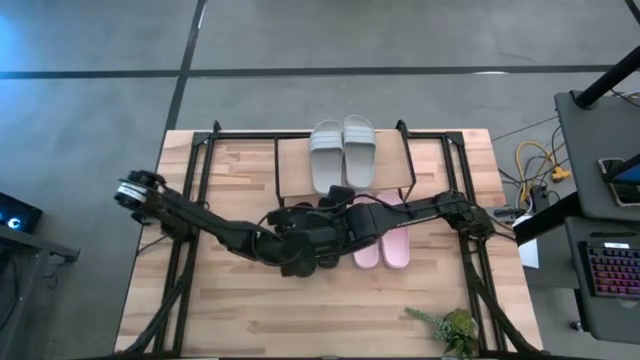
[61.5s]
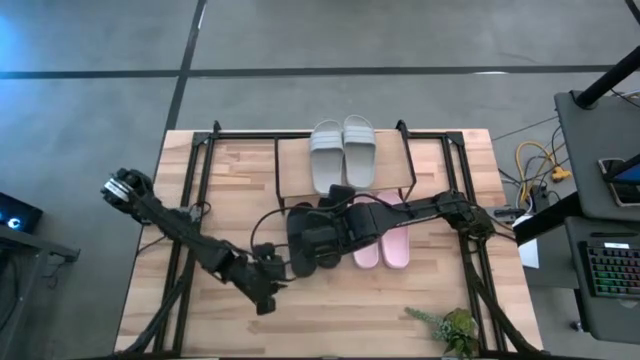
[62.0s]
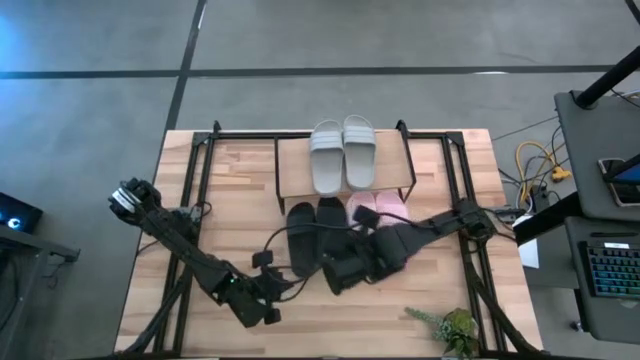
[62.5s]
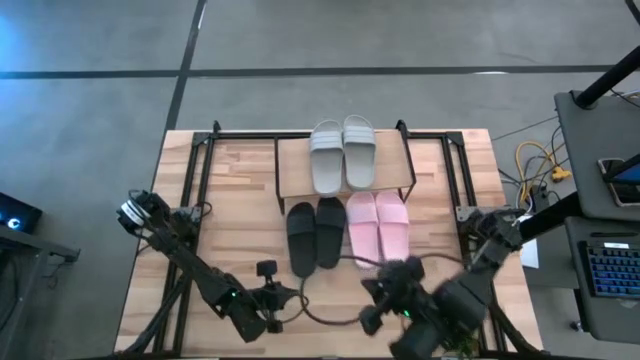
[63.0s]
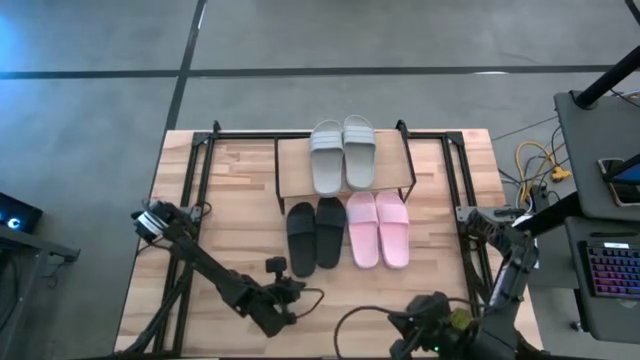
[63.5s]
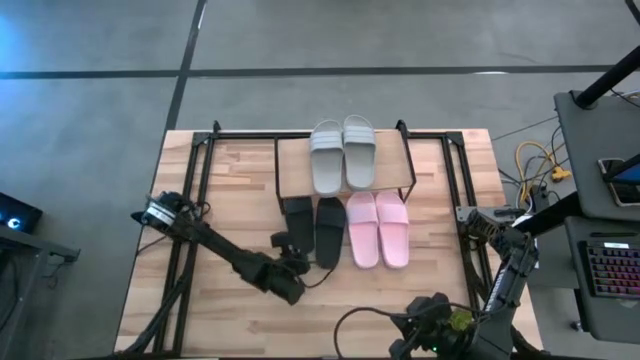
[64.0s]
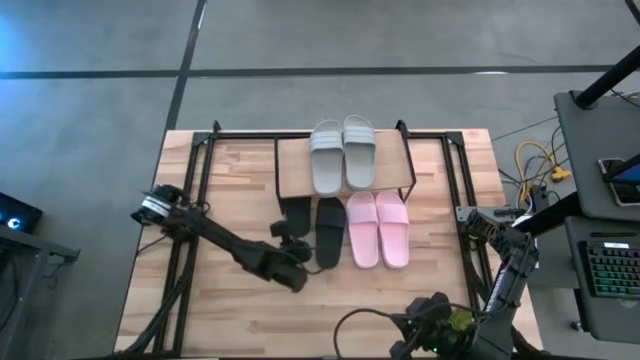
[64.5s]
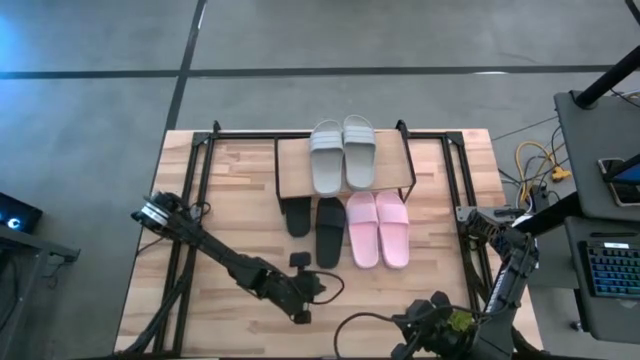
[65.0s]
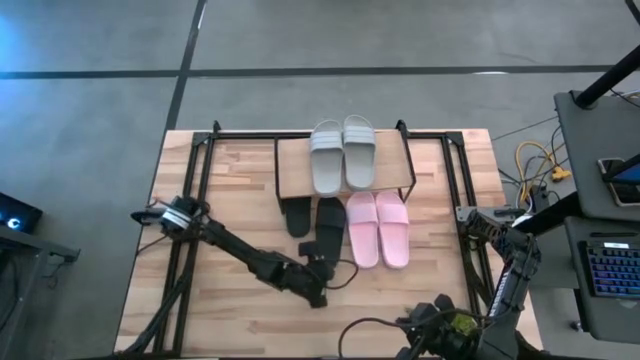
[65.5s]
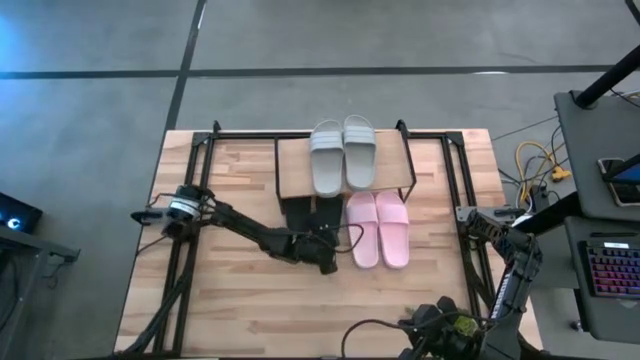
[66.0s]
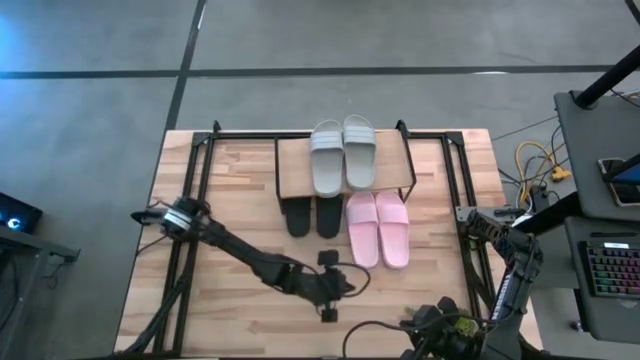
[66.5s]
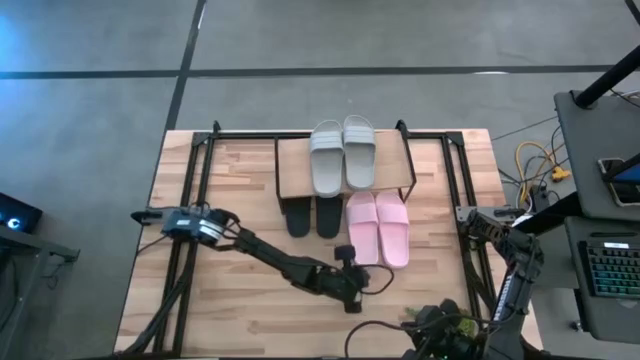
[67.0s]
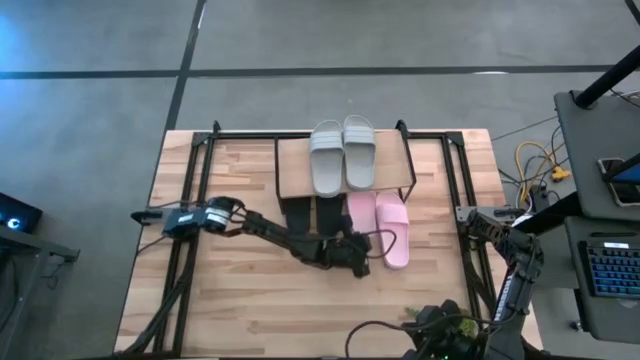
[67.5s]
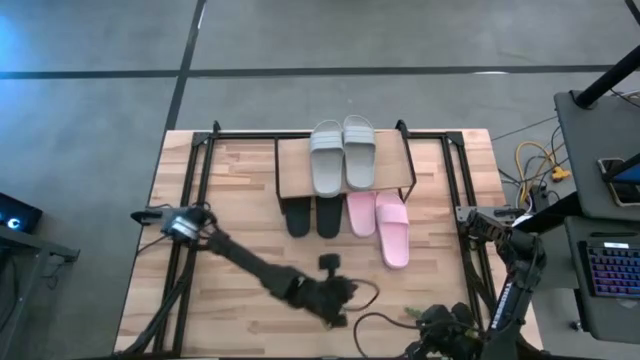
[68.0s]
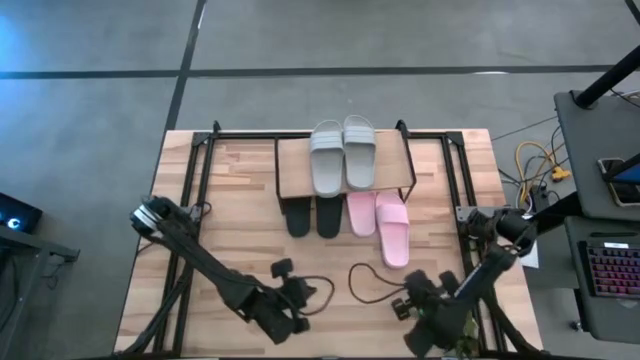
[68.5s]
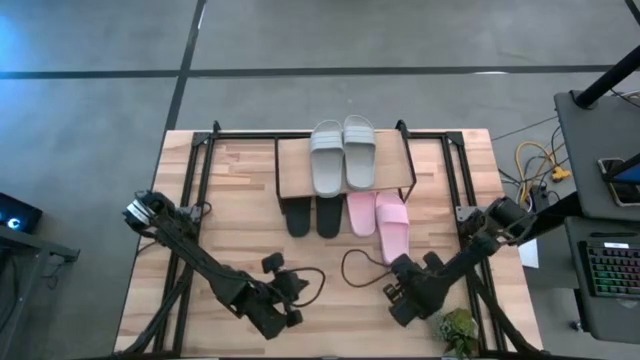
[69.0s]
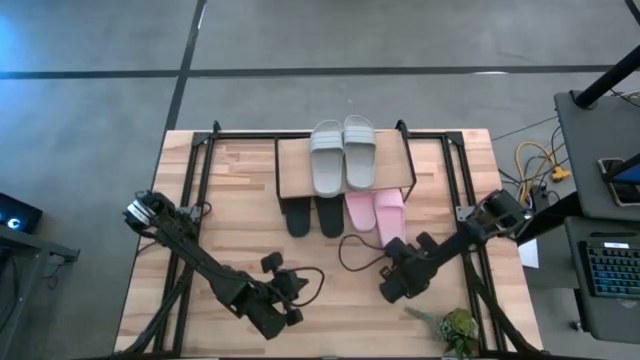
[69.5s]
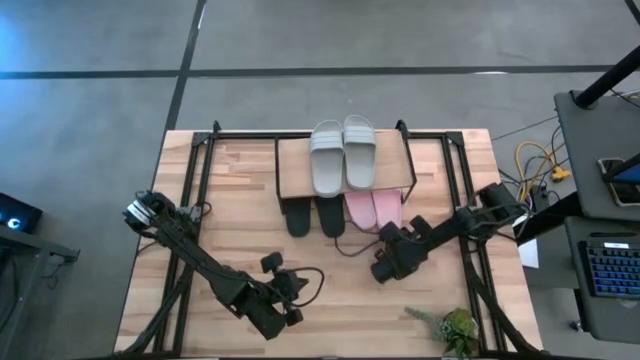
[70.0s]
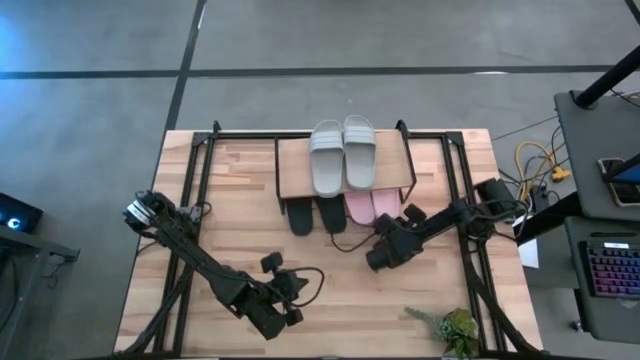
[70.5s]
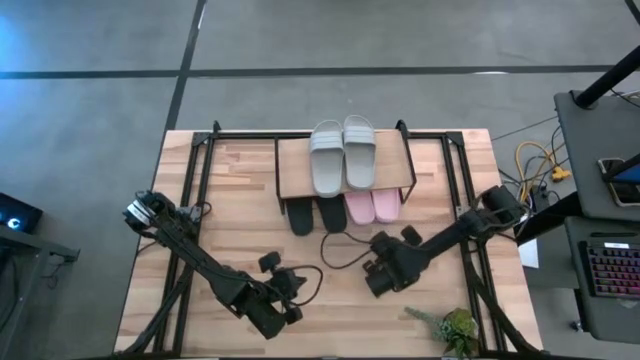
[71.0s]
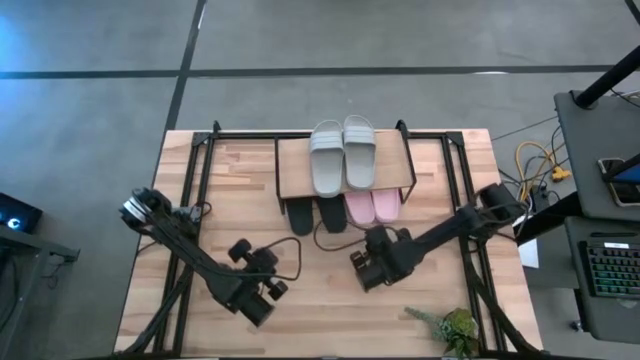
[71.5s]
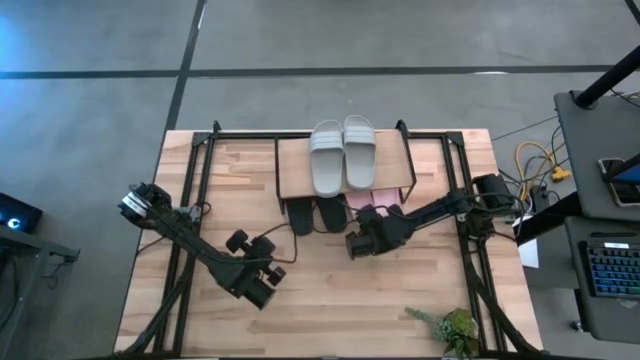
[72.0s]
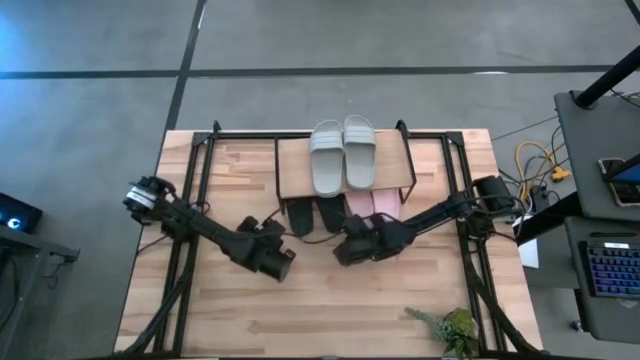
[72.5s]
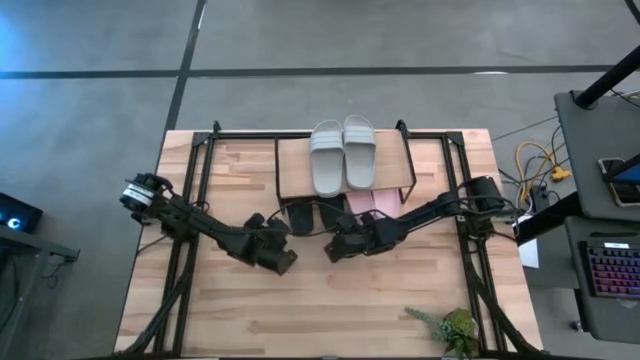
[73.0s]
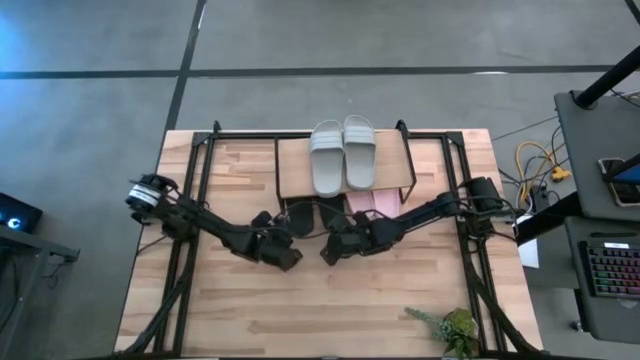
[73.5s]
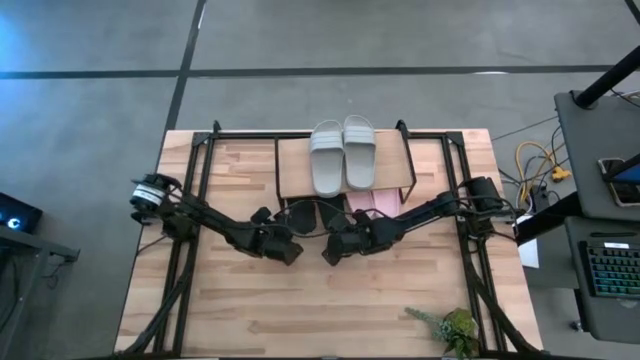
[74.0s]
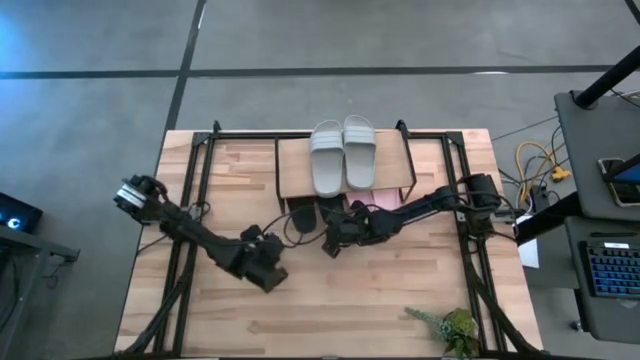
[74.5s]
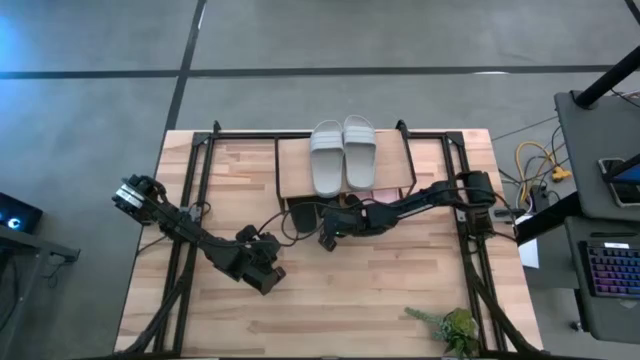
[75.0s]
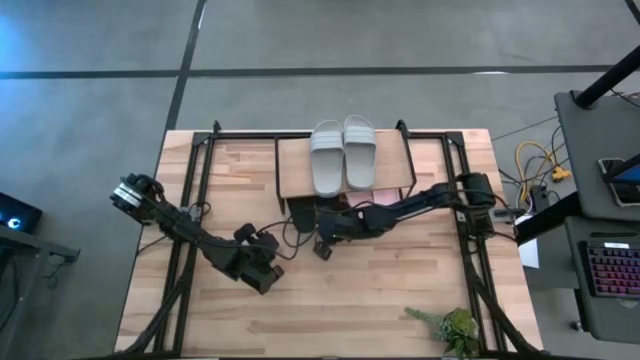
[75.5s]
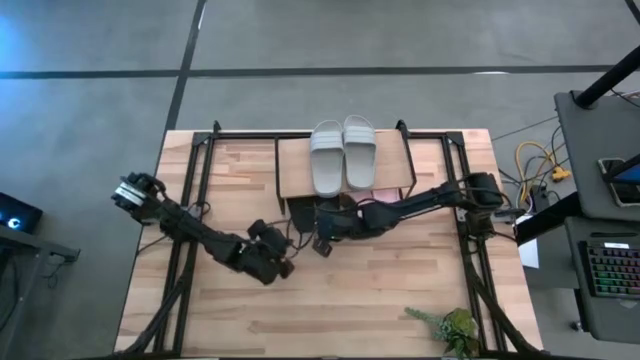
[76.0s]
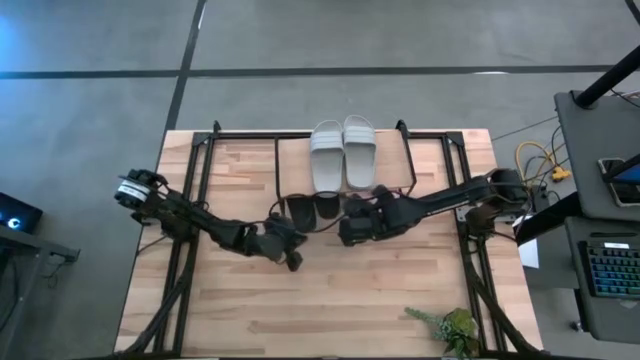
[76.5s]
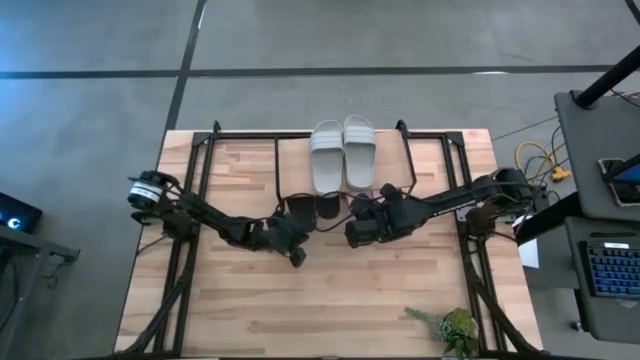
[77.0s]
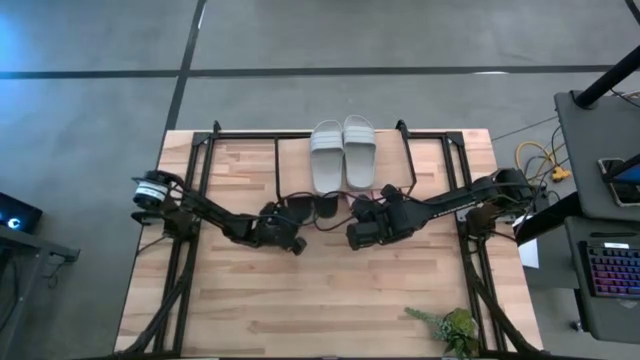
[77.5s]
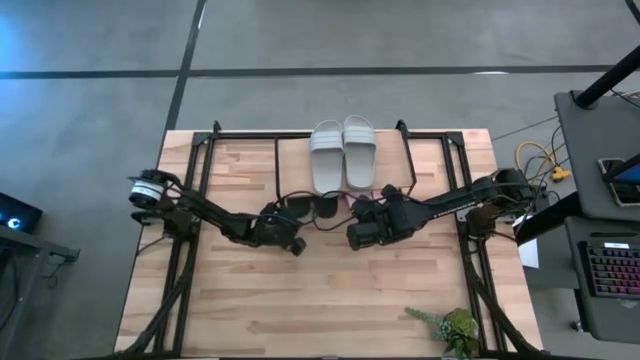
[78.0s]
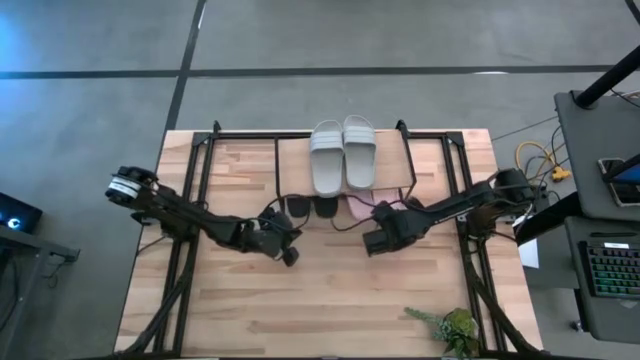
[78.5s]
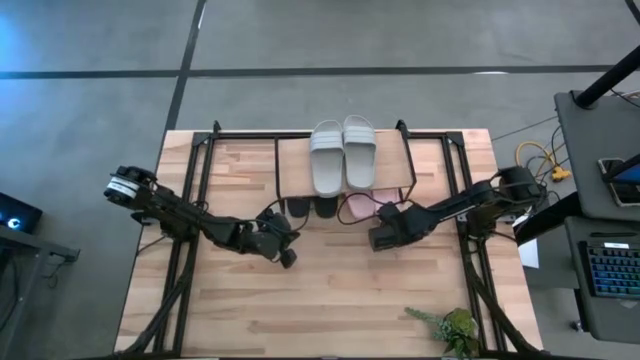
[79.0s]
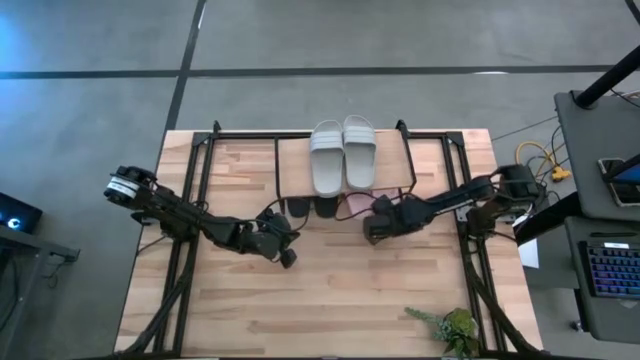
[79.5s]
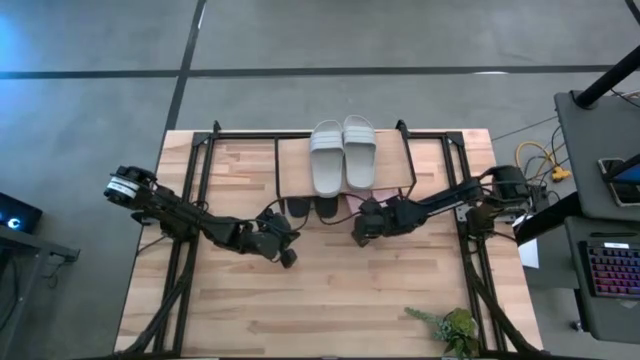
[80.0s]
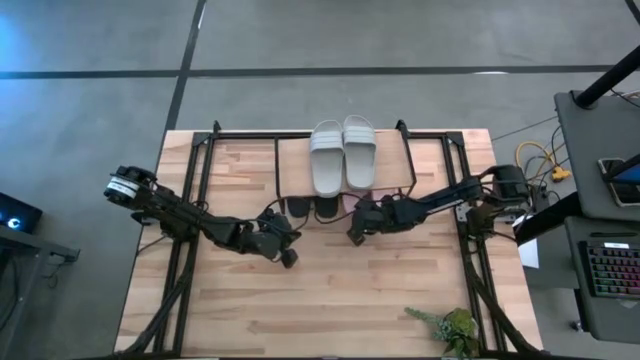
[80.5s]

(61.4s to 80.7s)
Task: Pick and place slides into the shelf
Adjust the slides under the shelf

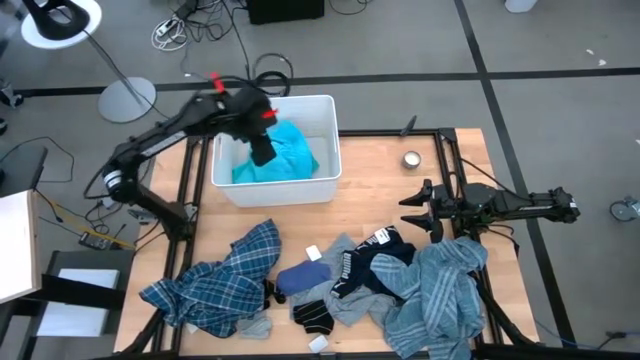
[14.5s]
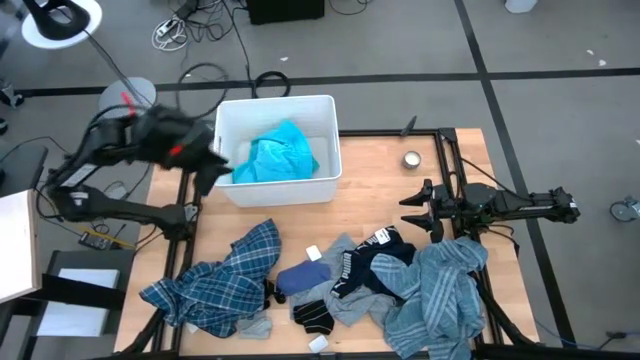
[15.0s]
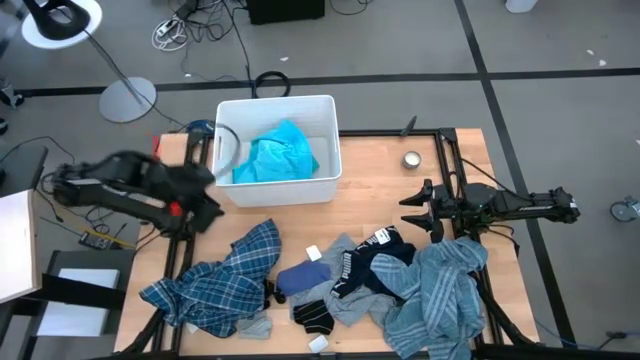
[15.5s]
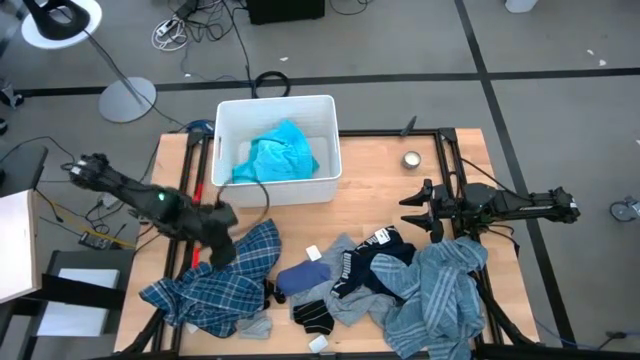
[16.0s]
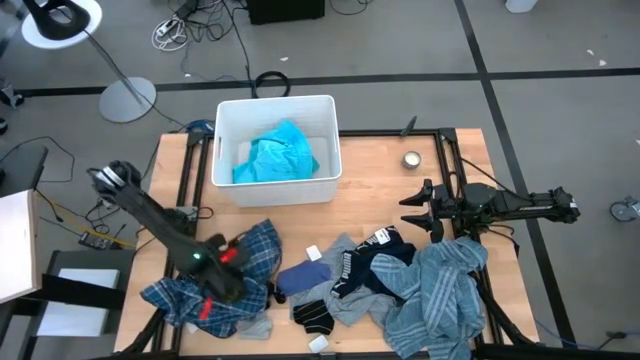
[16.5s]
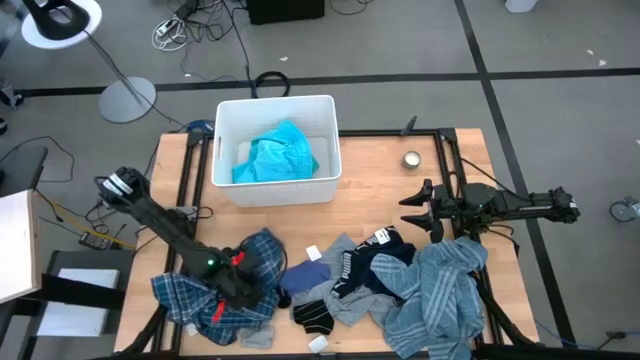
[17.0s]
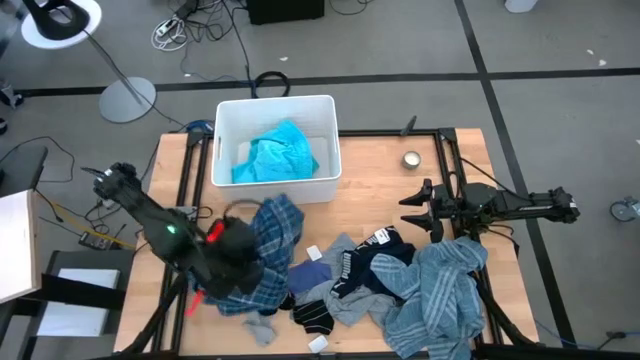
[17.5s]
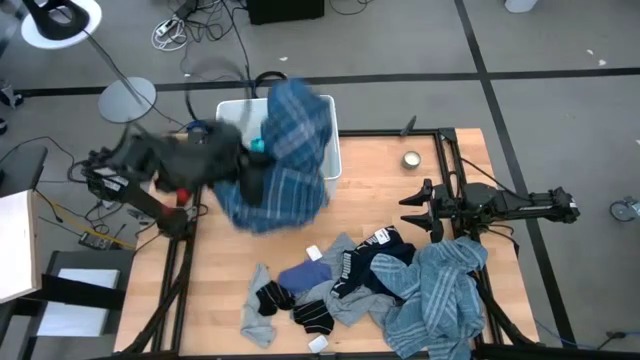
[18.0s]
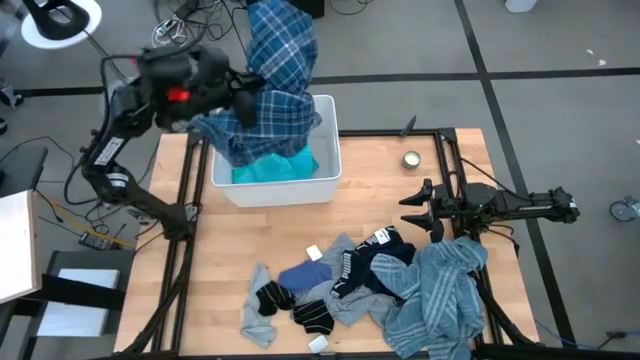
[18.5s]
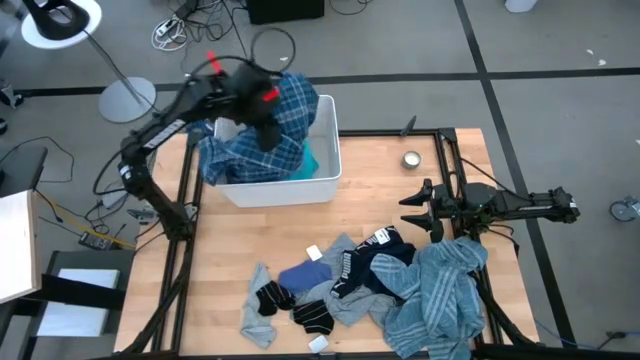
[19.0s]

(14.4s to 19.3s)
Task: Sort clothes
Put the blue long sleeve garment into the white laundry bin
